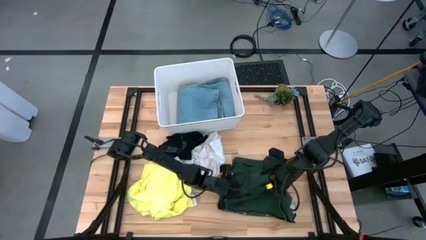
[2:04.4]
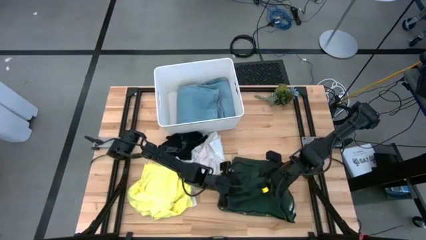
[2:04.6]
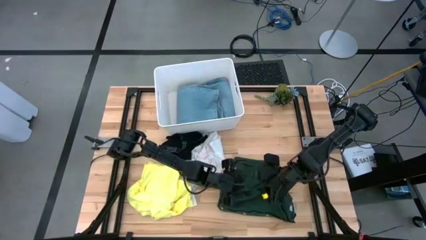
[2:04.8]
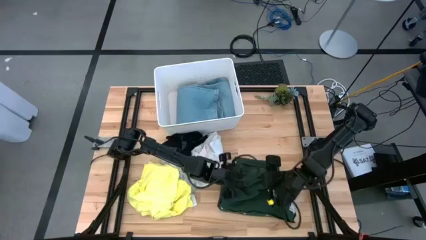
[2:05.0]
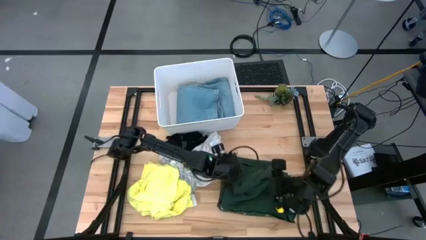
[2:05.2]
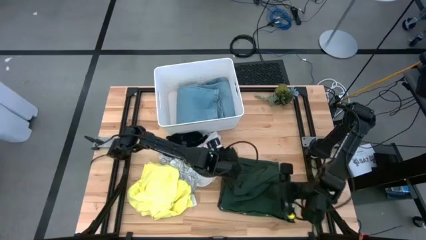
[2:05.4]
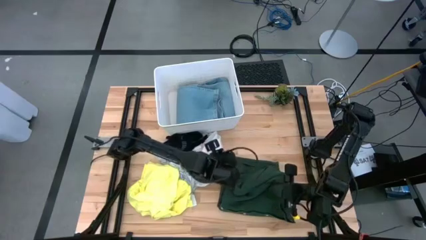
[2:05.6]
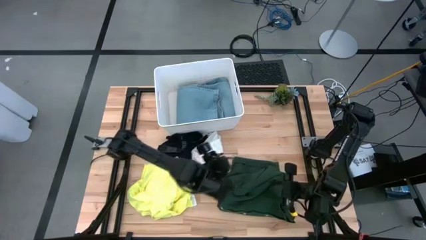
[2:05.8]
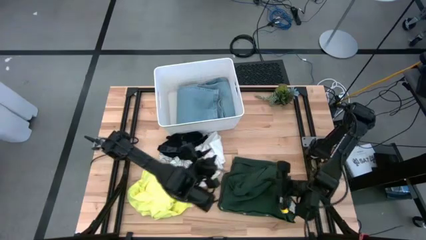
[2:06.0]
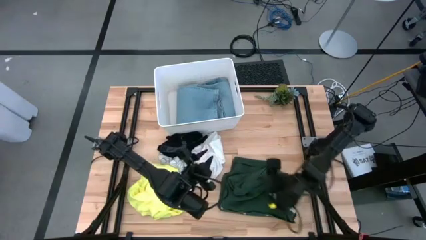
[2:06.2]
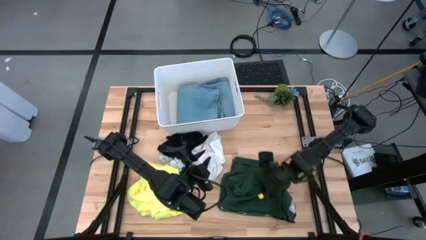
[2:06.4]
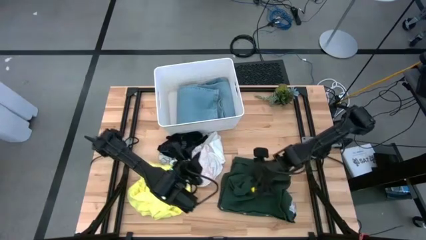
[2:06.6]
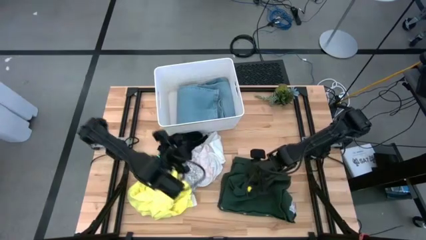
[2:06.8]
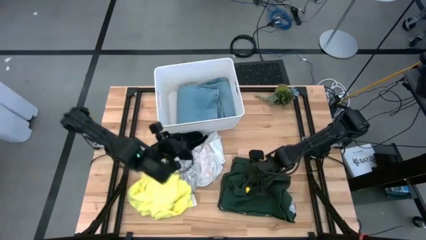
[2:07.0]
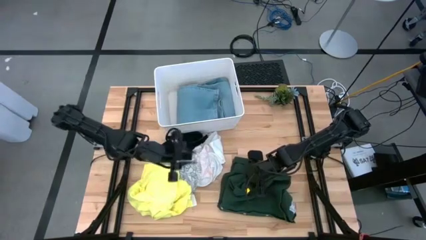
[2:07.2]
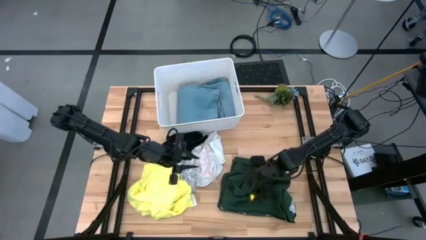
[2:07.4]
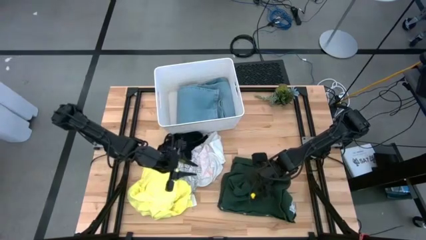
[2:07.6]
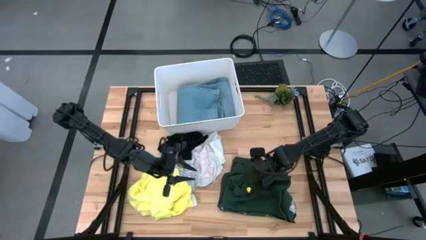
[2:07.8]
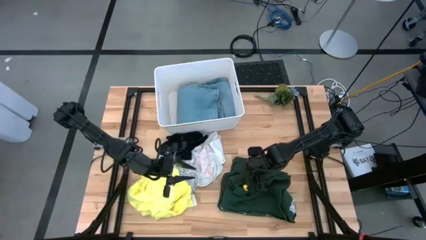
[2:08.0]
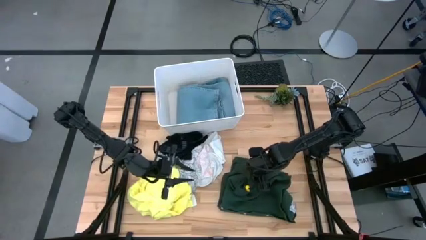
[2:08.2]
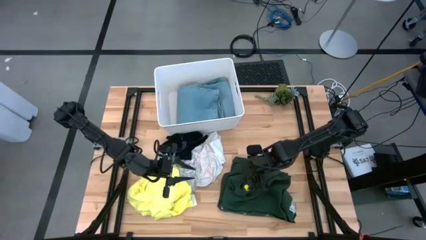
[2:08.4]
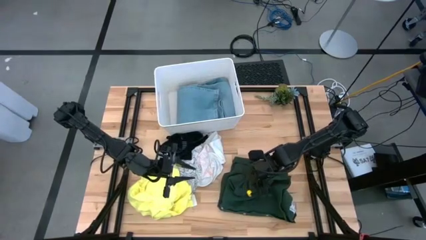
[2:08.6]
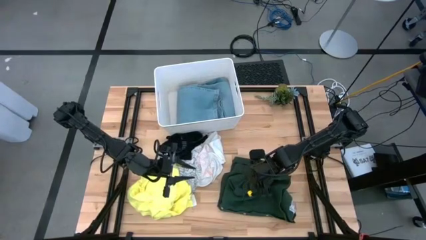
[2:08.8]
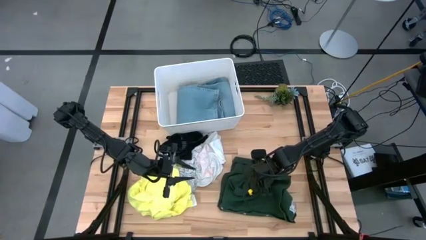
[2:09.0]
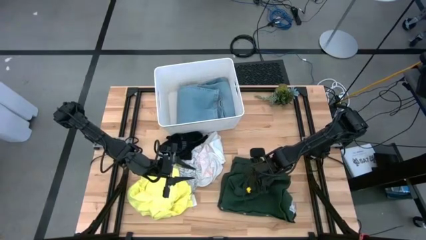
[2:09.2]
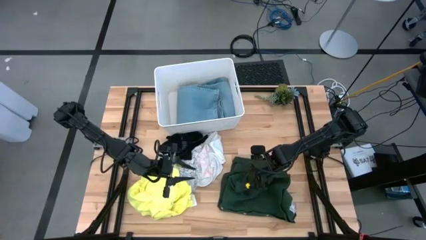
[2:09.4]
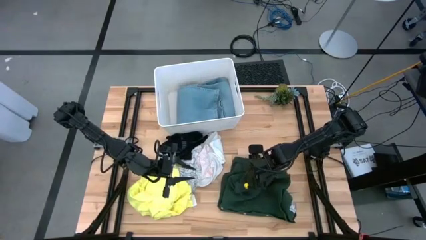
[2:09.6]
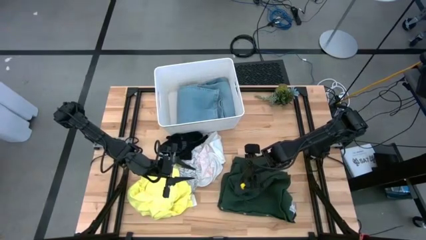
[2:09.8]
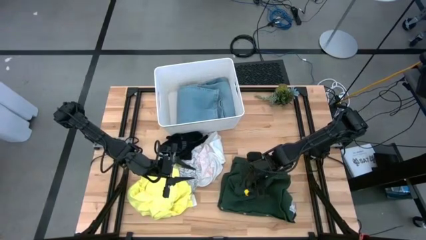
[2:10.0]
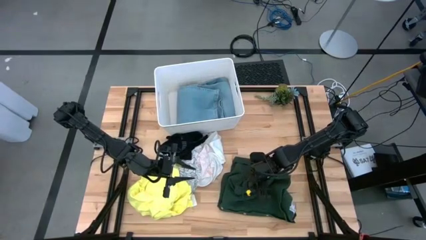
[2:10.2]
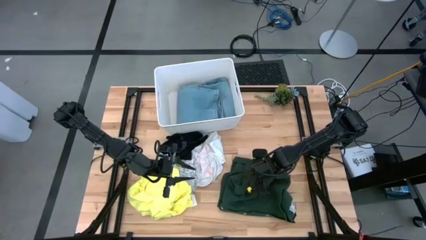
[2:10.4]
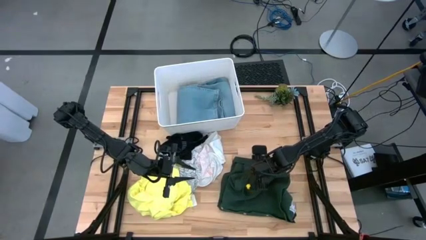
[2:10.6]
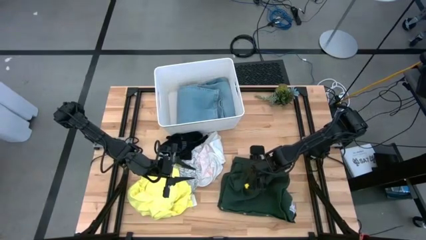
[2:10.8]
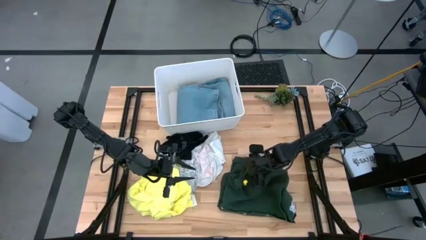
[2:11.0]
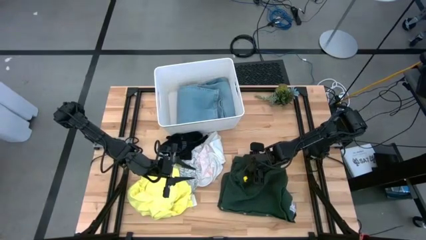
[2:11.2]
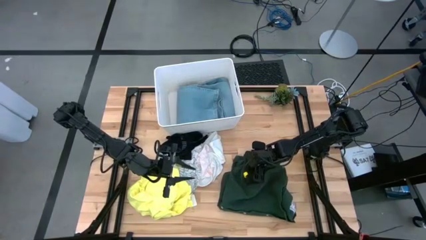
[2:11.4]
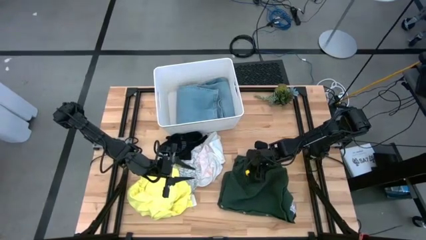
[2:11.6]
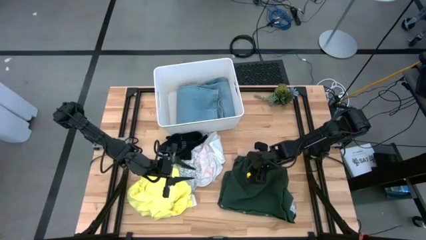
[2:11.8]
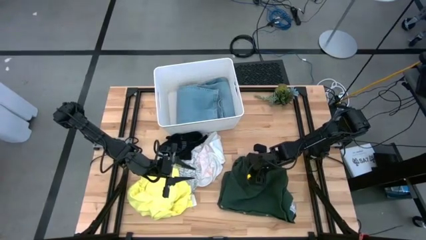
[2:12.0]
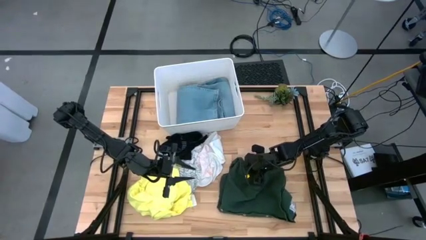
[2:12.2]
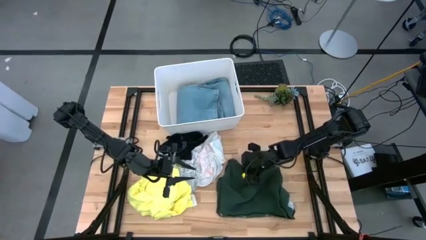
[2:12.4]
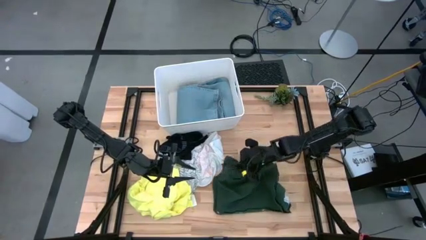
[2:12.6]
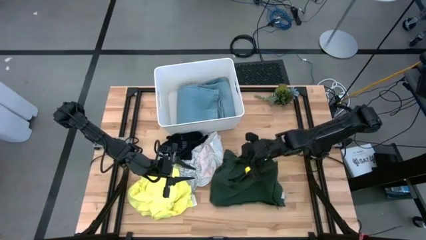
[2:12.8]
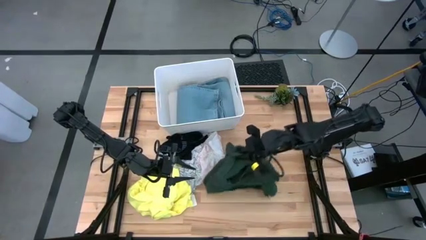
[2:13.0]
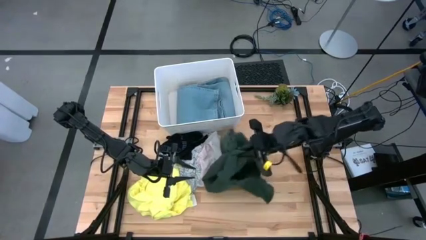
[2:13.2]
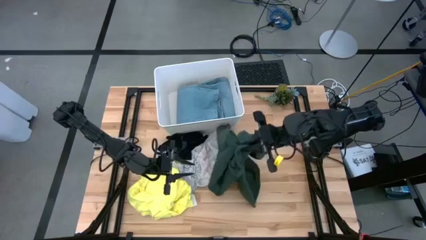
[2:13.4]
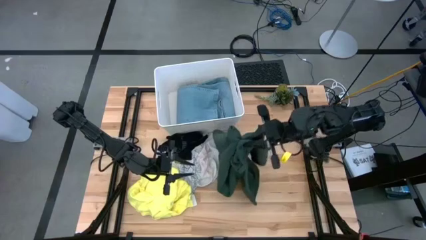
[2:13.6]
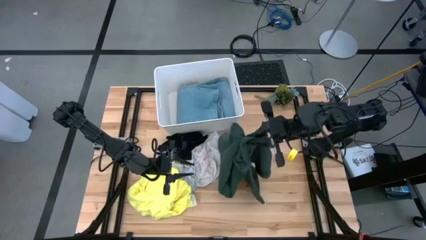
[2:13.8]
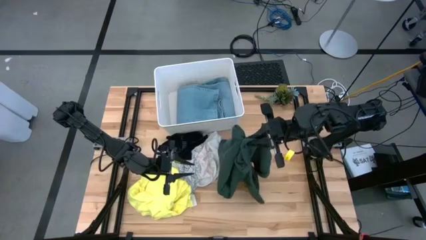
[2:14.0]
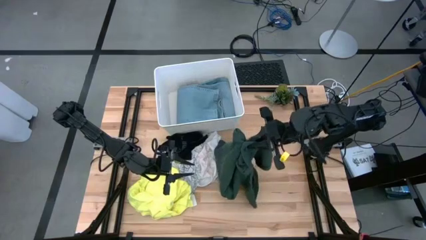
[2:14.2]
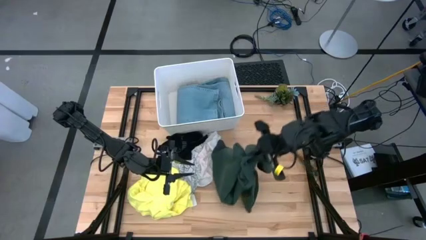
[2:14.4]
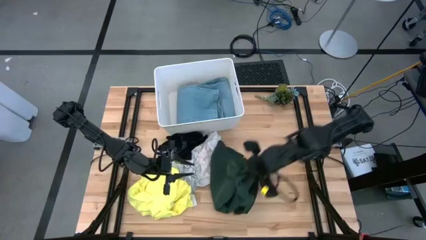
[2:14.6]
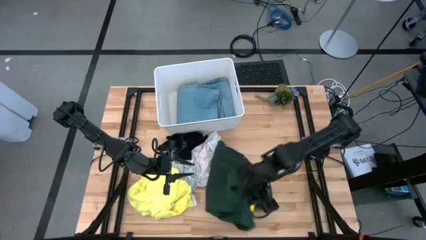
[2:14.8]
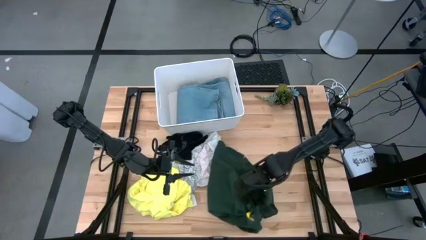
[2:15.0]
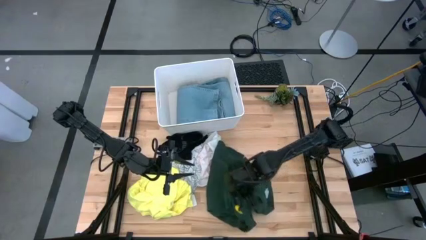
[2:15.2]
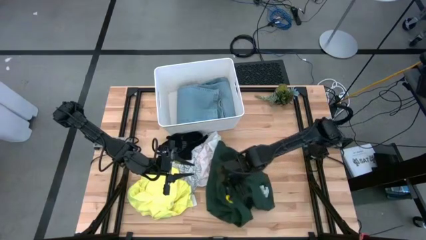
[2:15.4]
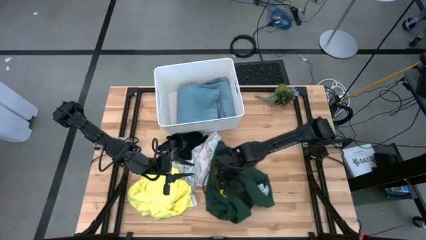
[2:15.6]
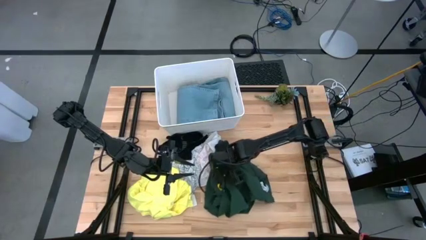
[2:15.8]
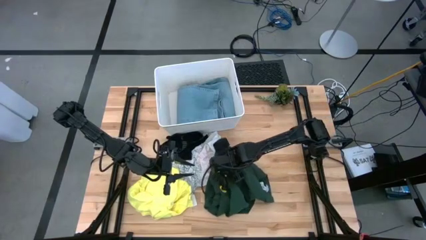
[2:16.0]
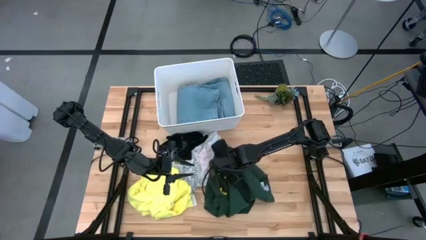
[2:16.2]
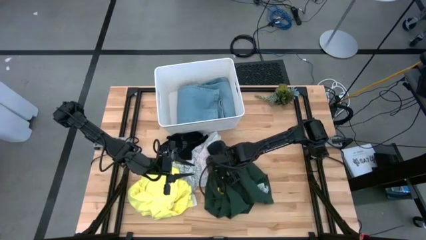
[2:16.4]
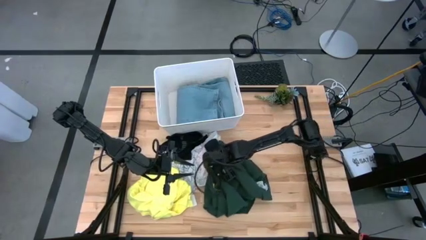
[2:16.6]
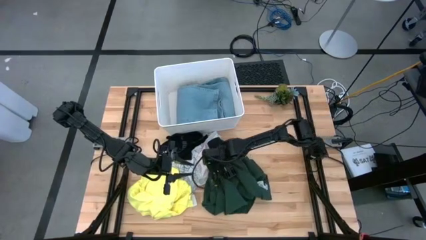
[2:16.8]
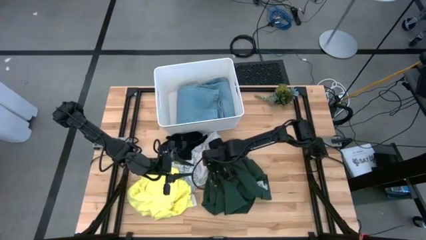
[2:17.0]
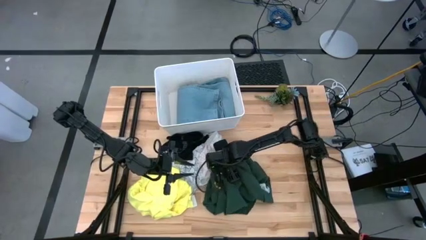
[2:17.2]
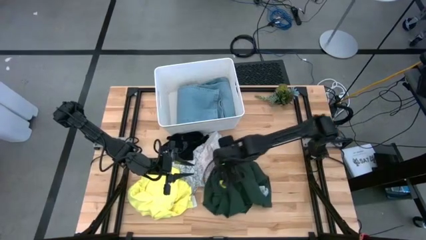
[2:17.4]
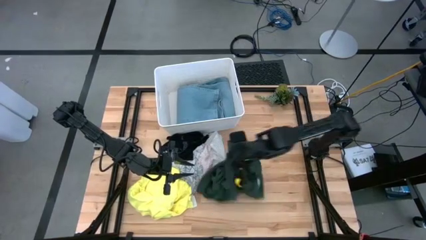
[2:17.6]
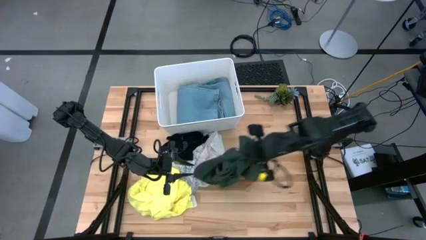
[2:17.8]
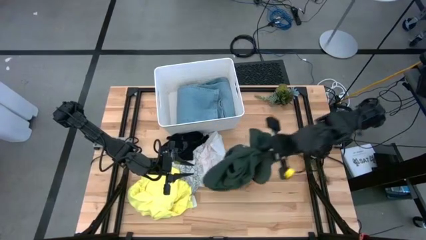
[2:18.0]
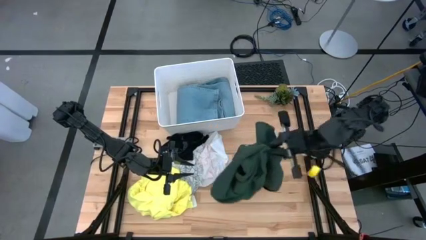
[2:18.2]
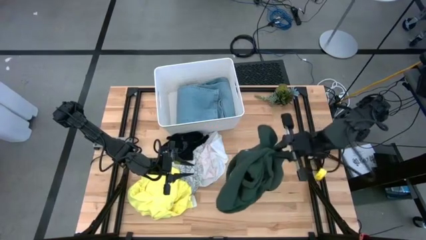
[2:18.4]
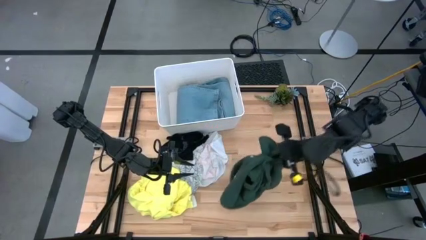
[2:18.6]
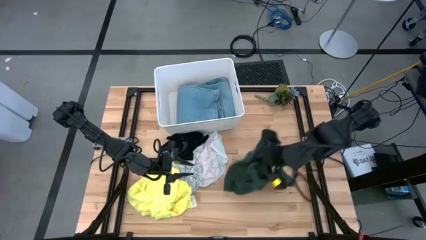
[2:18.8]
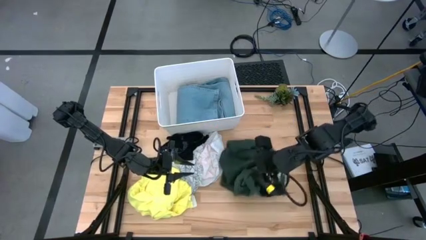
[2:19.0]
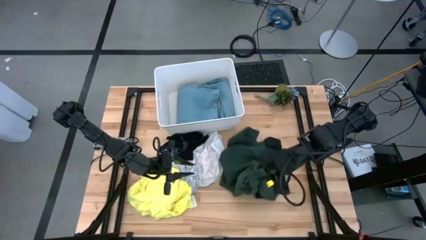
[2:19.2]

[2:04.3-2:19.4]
Task: Fold laundry
Fold the green polo shirt
